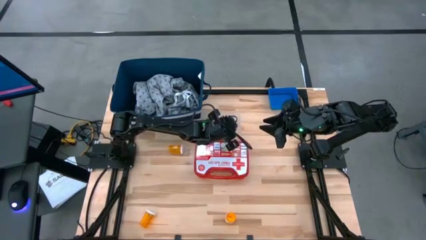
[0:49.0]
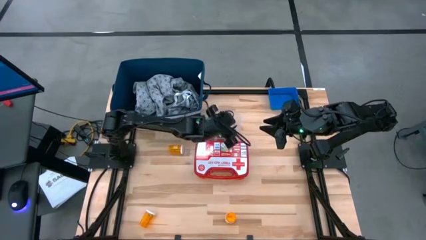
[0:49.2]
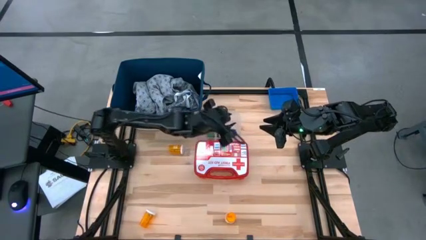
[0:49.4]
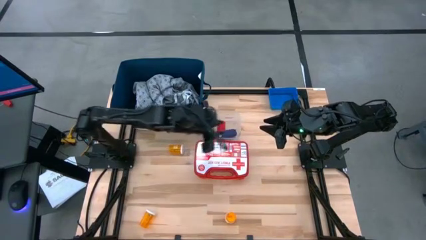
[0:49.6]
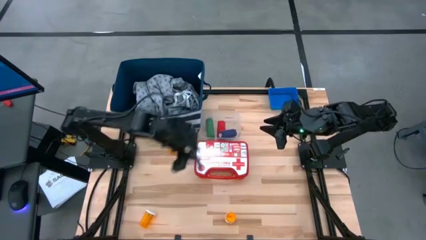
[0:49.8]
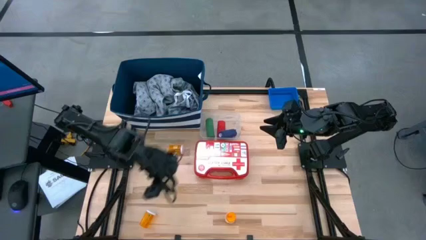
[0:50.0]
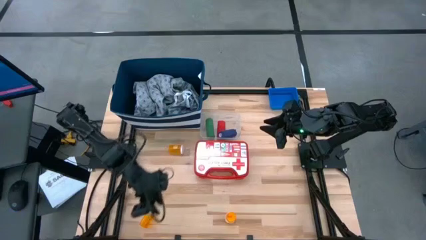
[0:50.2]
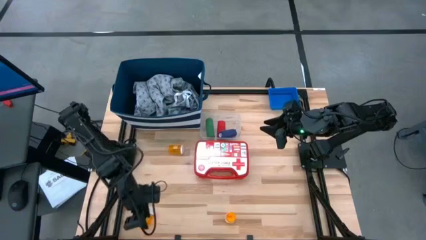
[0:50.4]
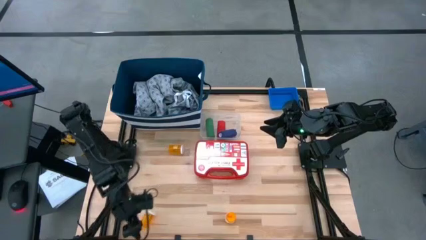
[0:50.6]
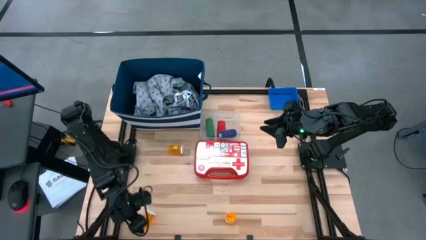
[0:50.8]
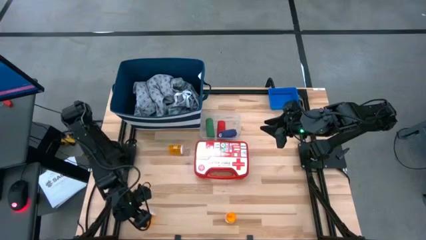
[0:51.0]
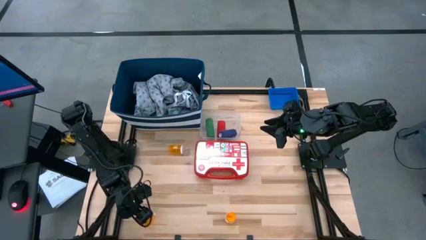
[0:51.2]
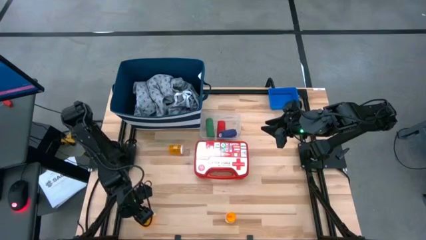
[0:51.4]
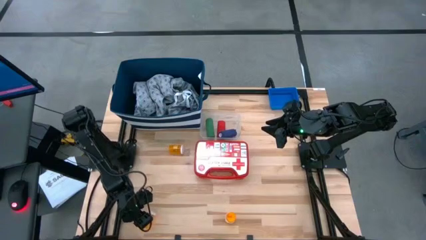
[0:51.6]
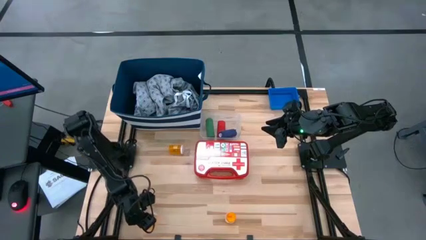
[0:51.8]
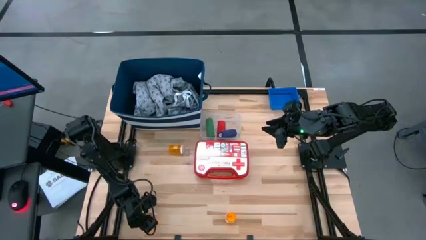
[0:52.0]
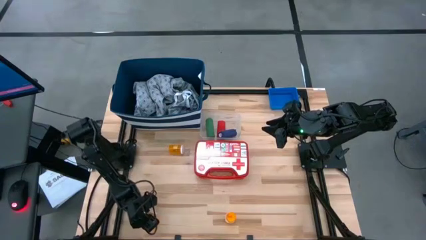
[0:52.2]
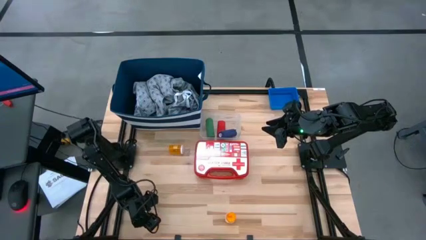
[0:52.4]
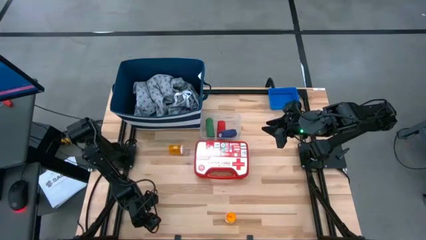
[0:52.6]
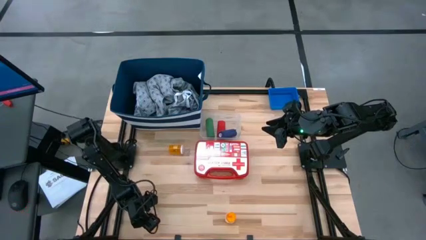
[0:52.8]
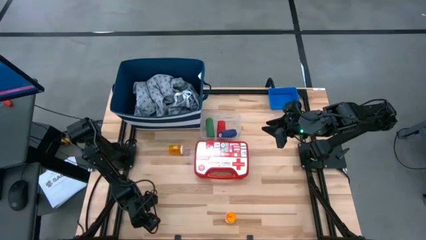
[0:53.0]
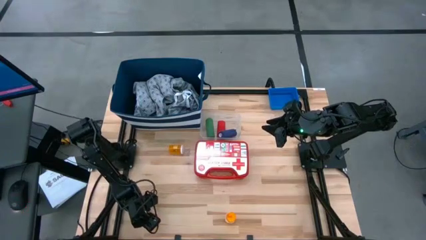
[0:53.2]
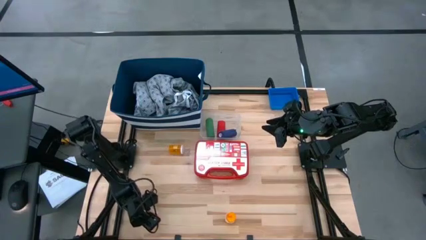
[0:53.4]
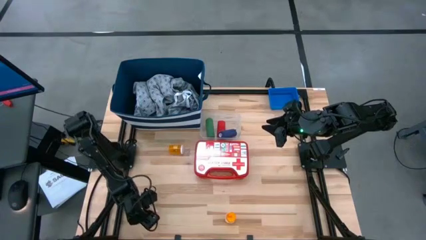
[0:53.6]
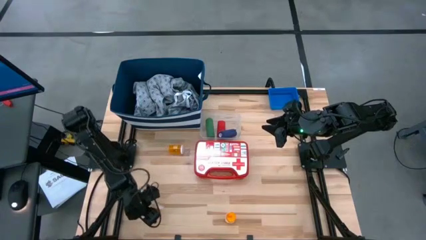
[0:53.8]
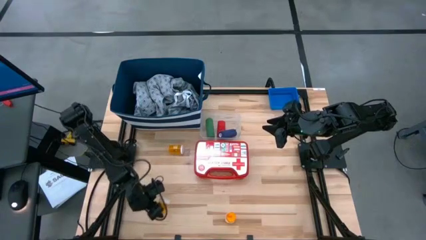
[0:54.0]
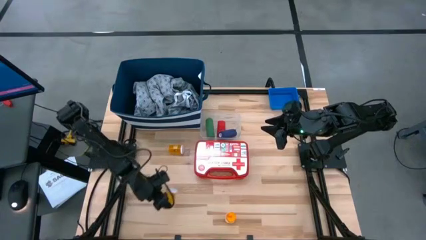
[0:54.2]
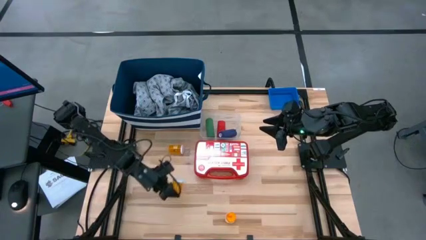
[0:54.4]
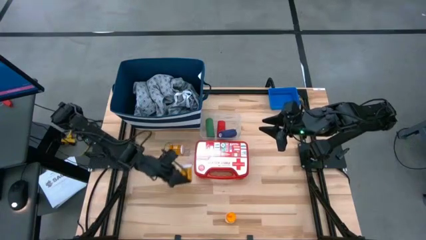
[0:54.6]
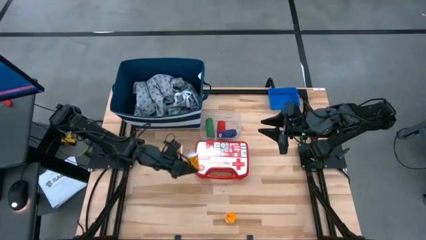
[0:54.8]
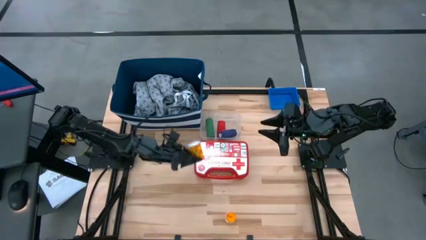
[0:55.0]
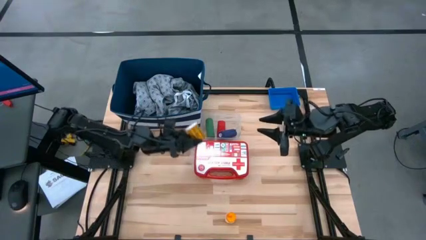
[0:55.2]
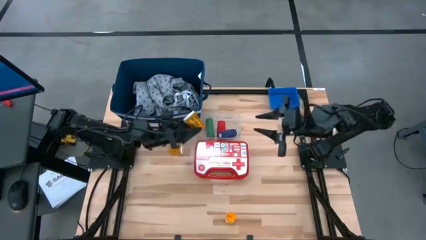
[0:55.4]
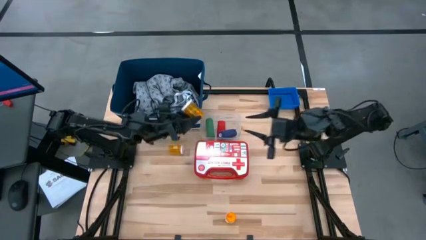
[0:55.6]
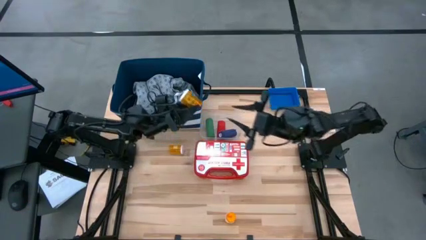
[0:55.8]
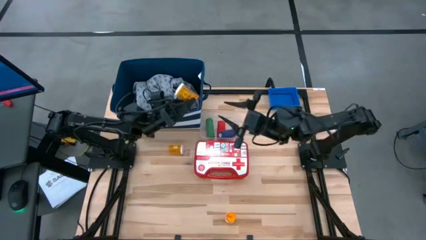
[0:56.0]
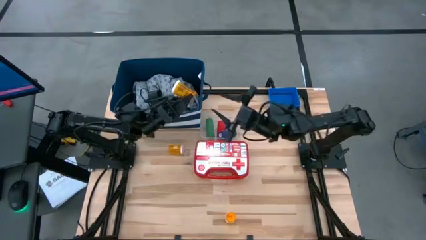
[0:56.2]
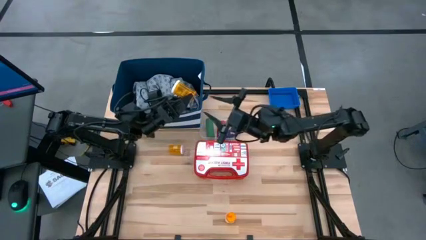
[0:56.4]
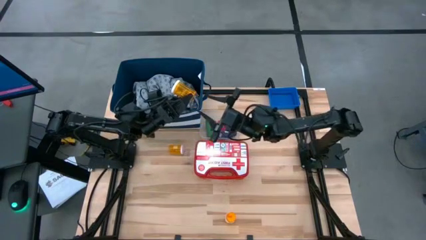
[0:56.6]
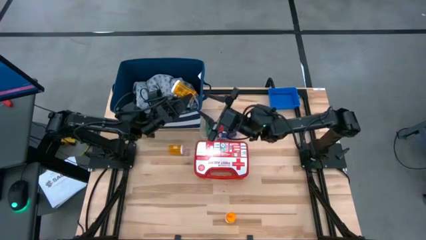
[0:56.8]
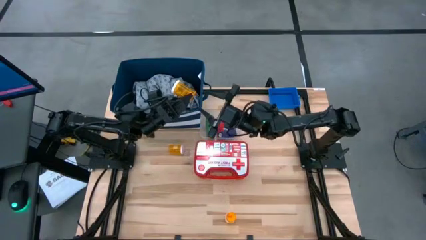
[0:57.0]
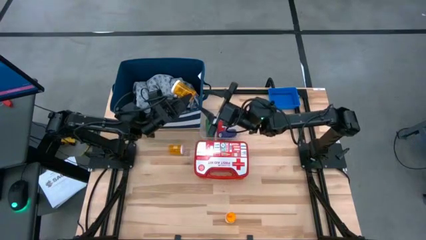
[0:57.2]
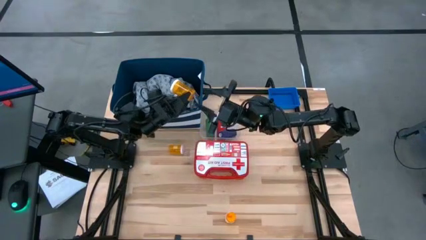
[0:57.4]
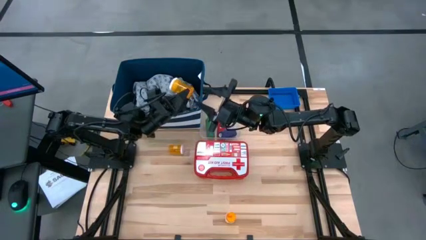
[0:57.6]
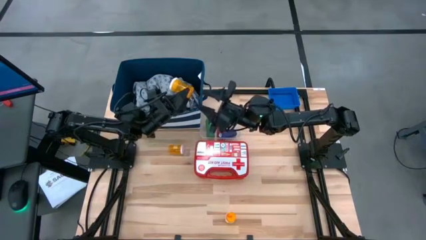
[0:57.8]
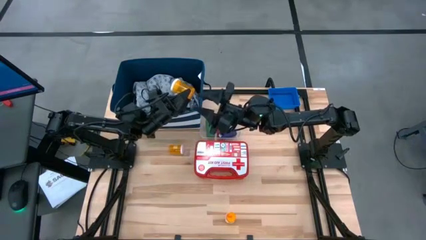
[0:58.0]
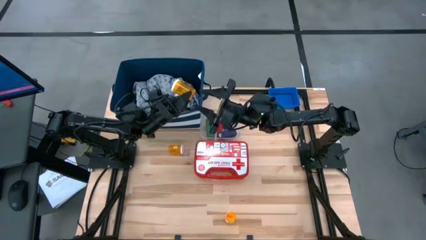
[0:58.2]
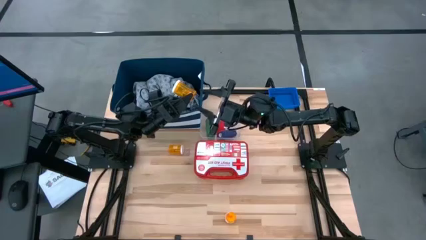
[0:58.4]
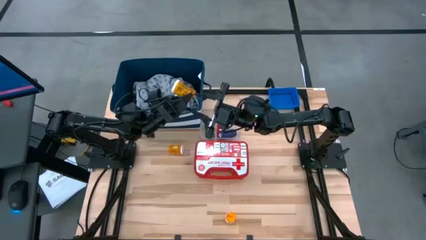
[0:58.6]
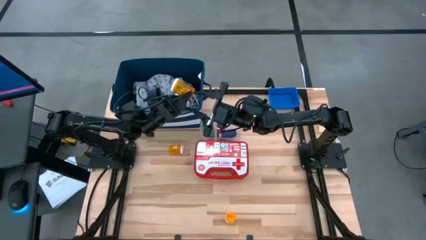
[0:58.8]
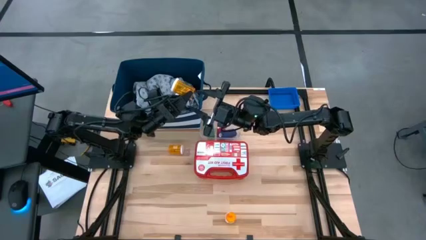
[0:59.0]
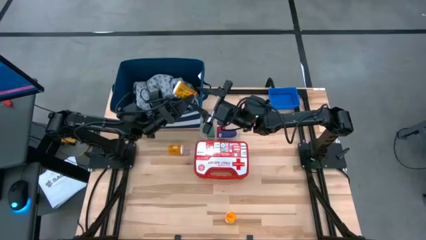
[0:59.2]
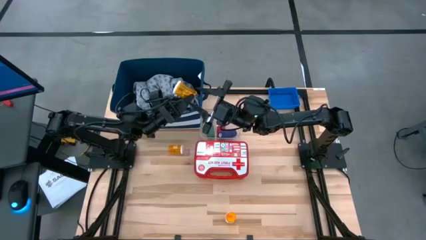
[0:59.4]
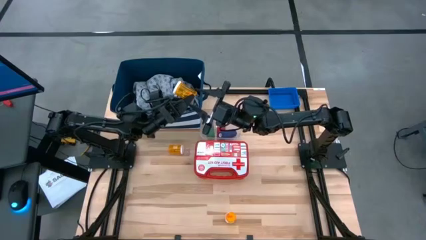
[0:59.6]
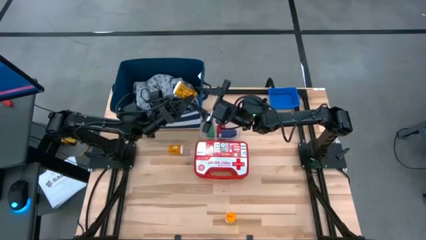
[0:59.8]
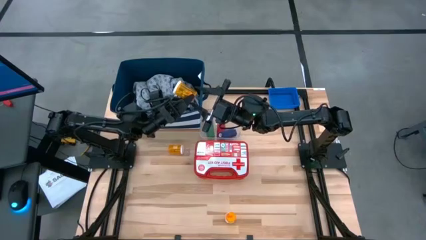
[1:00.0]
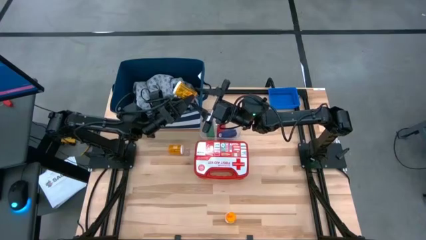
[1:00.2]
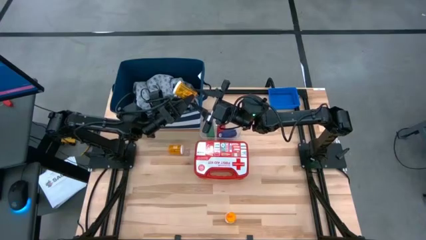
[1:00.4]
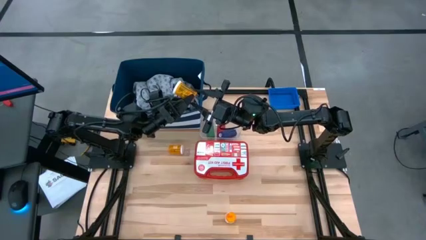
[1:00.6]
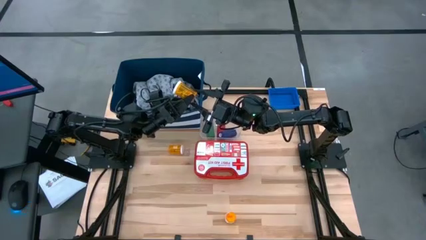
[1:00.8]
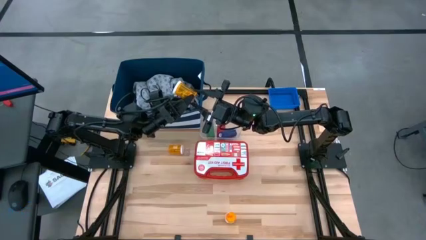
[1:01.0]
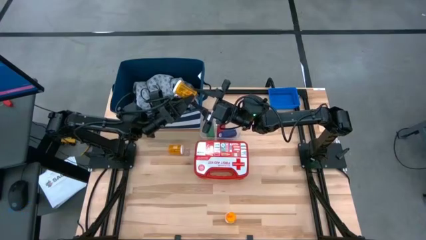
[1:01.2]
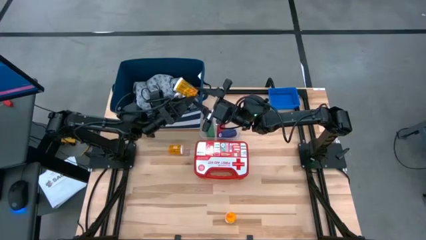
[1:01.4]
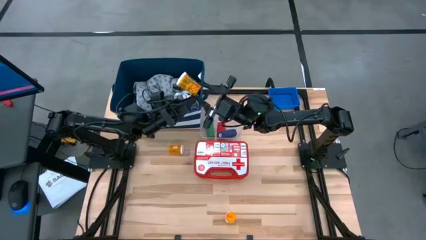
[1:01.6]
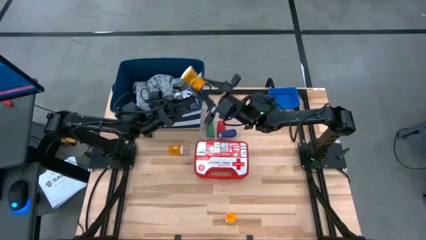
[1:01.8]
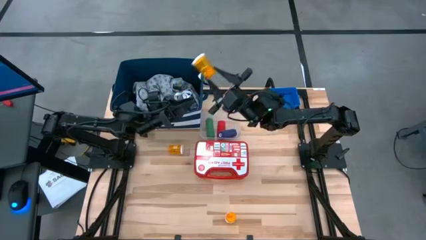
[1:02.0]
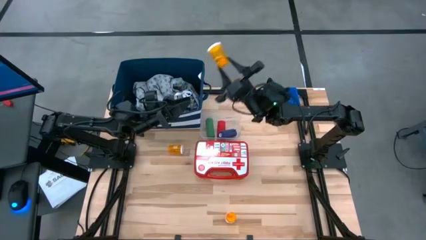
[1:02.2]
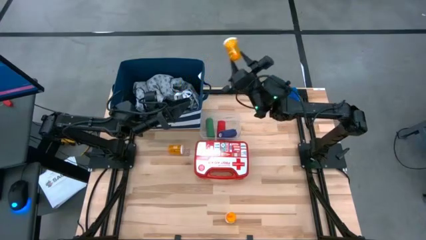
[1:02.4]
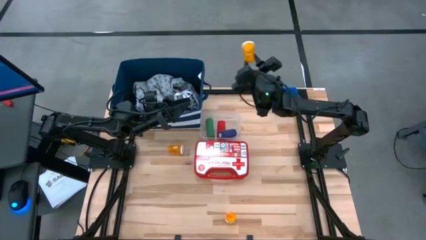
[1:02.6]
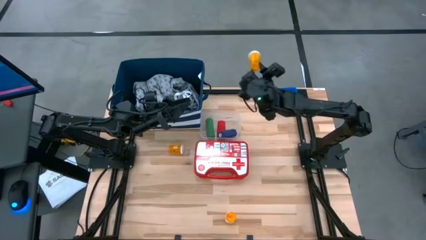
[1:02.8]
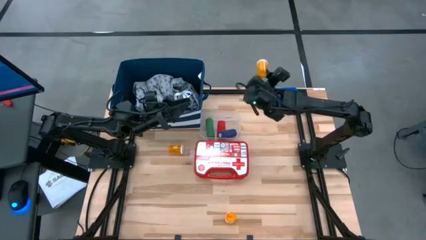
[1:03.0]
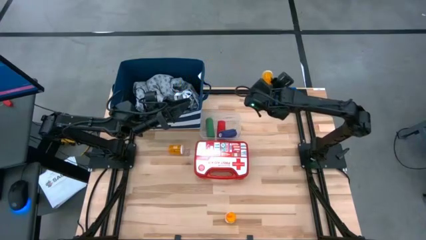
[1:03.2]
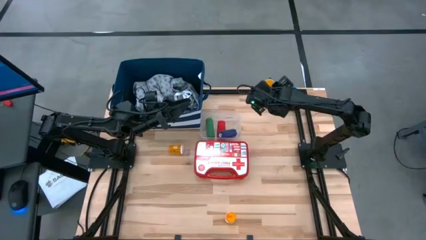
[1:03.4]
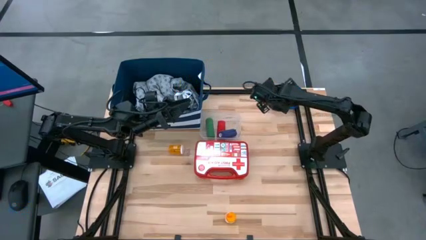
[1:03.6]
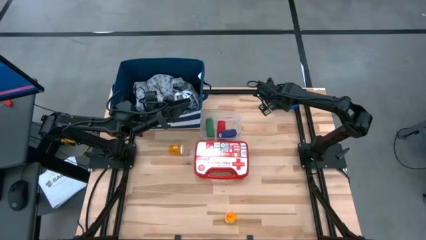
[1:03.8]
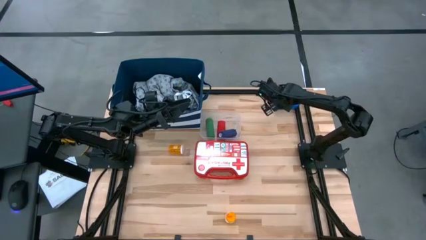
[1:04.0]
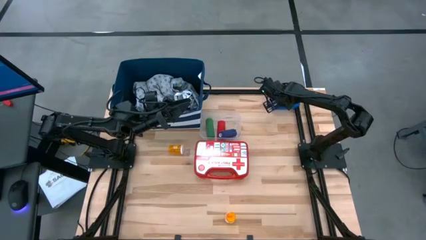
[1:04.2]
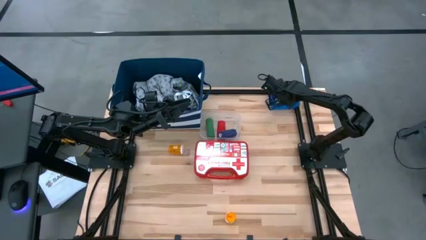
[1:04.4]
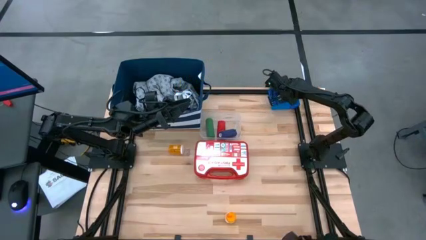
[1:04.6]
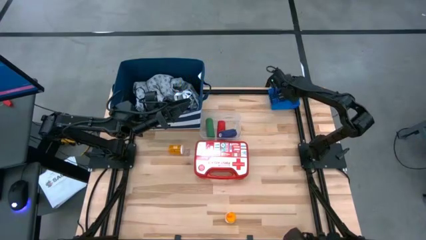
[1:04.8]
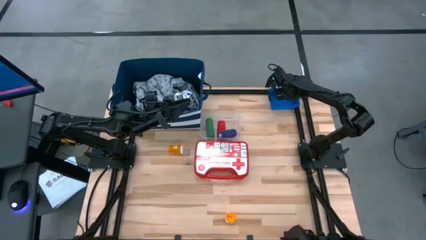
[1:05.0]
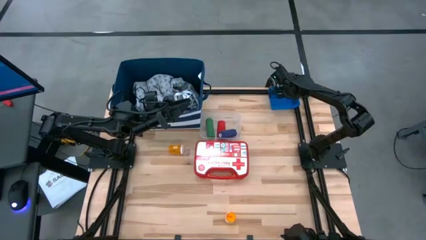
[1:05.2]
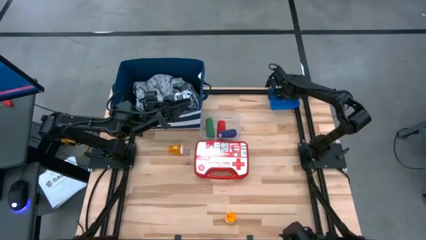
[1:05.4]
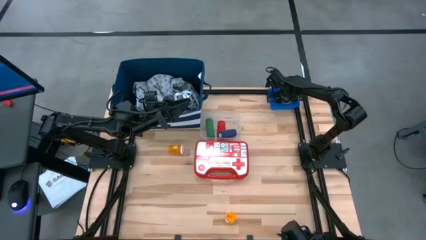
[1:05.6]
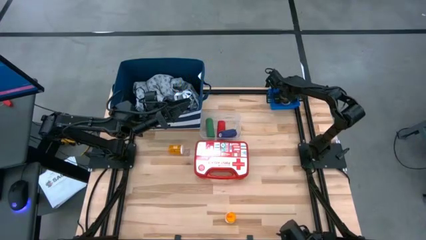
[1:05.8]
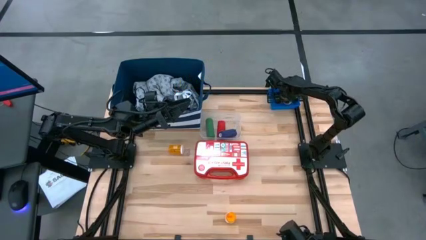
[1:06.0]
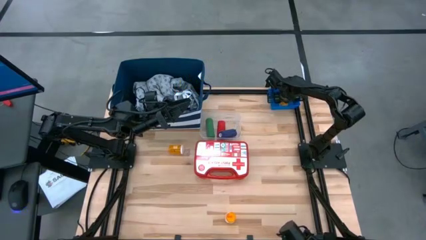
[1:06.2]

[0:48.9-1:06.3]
Task: Pick & place medical supplies in basket/bin
Put the bottom left orange pill bottle into the blue bin
